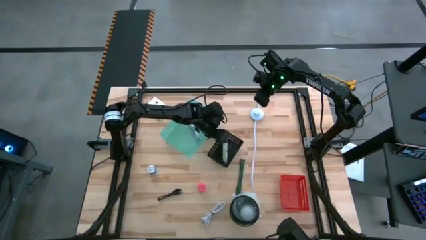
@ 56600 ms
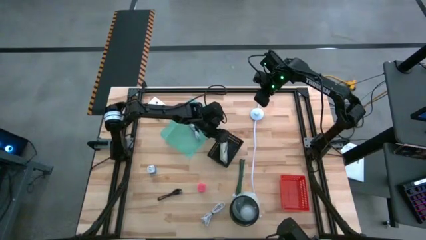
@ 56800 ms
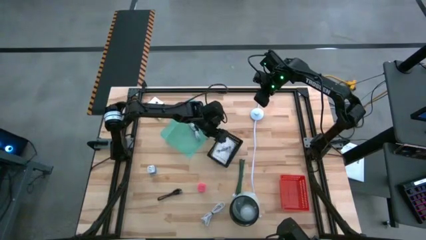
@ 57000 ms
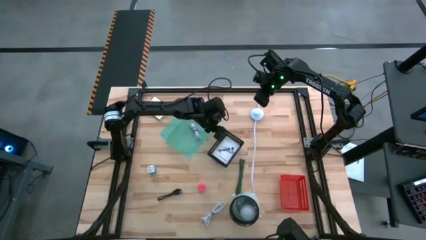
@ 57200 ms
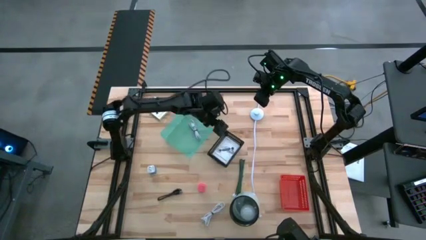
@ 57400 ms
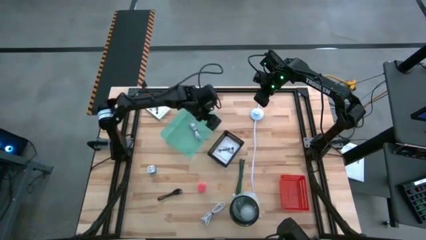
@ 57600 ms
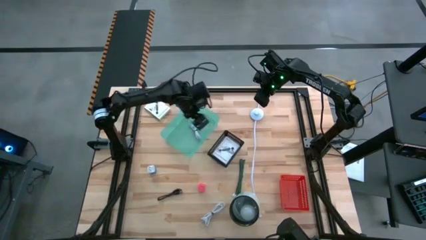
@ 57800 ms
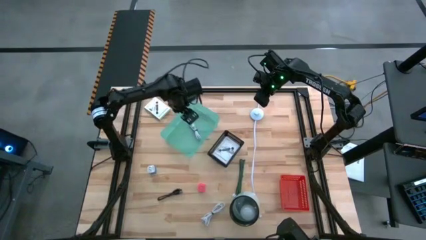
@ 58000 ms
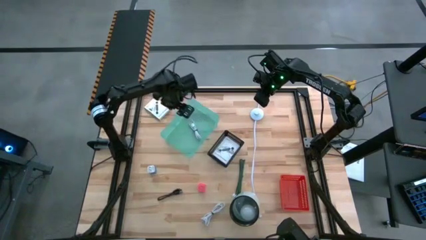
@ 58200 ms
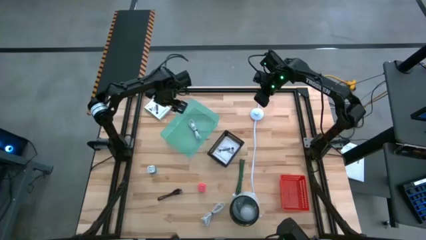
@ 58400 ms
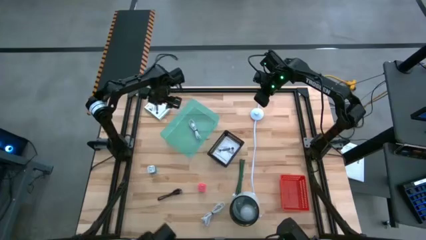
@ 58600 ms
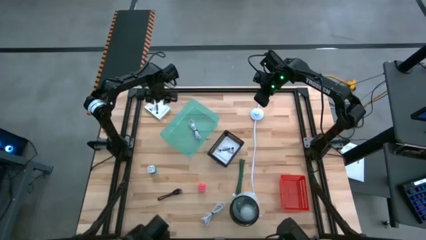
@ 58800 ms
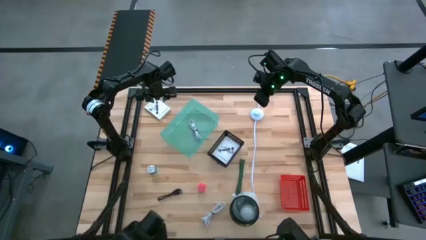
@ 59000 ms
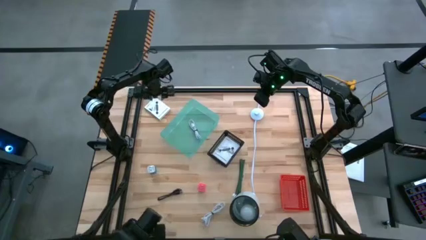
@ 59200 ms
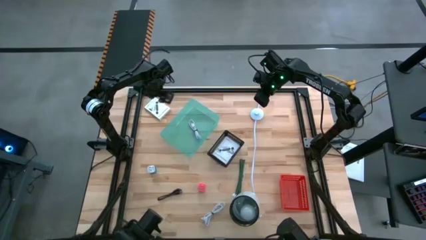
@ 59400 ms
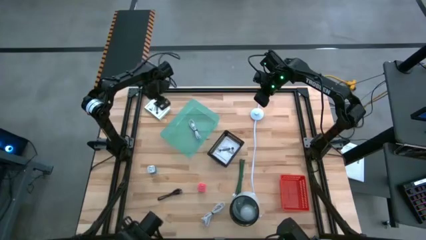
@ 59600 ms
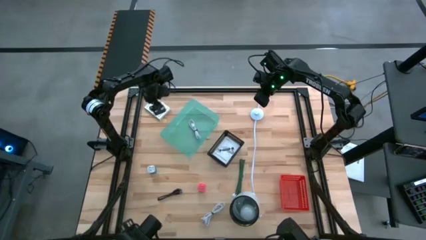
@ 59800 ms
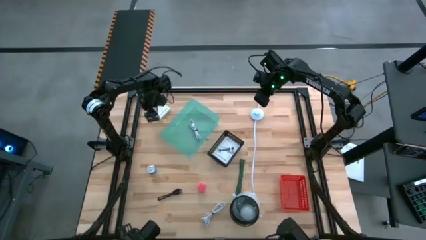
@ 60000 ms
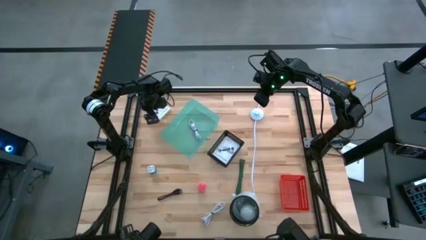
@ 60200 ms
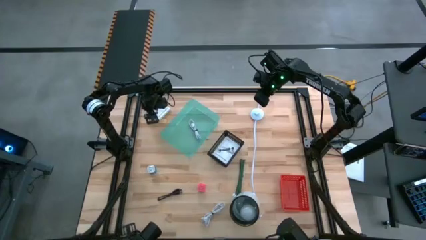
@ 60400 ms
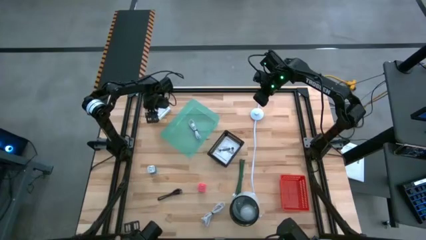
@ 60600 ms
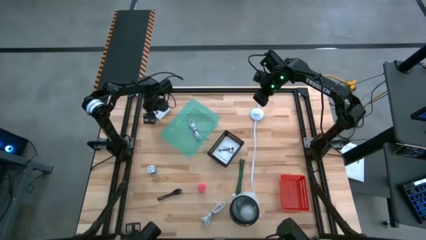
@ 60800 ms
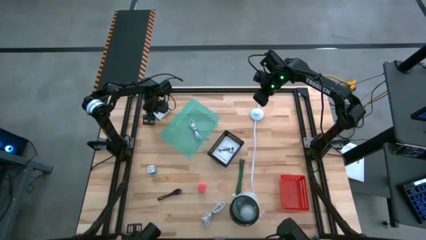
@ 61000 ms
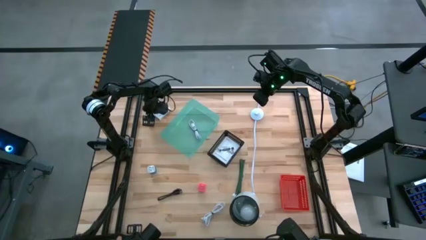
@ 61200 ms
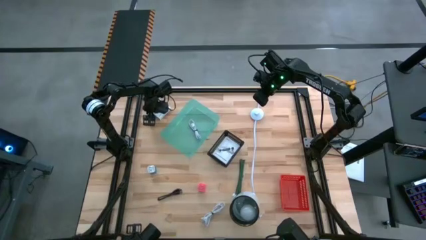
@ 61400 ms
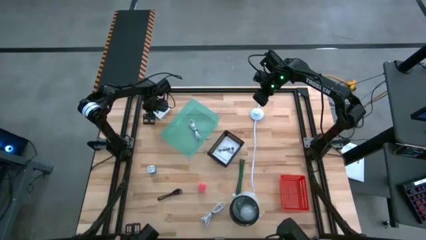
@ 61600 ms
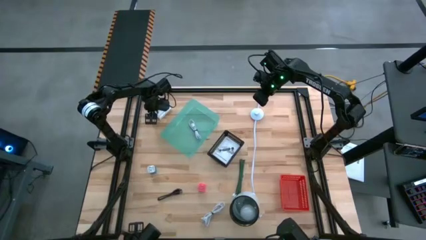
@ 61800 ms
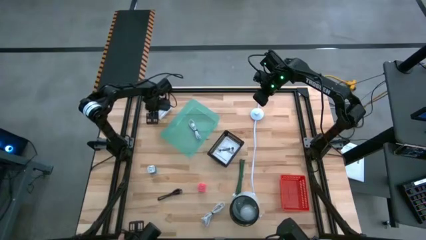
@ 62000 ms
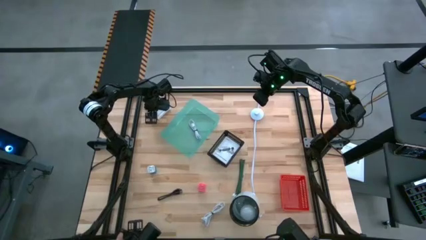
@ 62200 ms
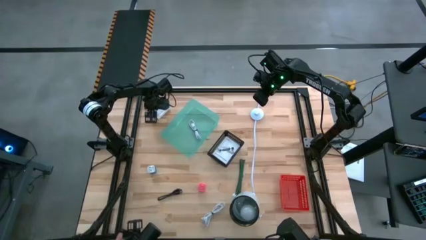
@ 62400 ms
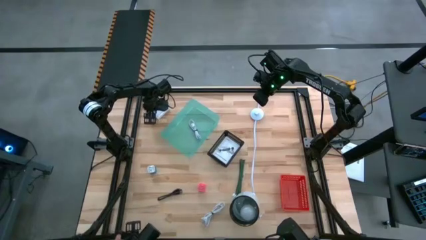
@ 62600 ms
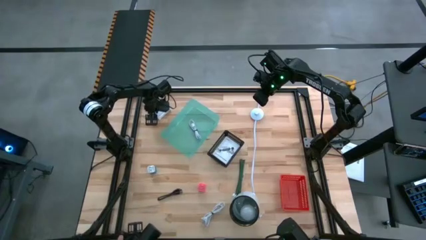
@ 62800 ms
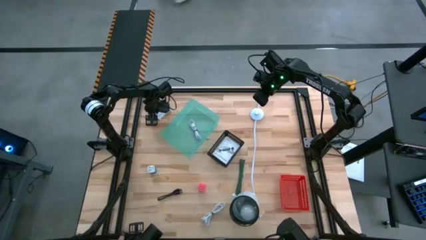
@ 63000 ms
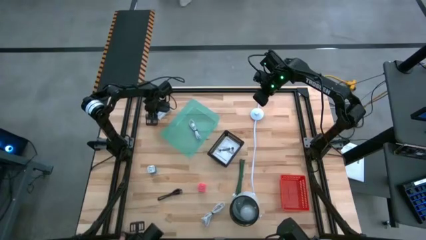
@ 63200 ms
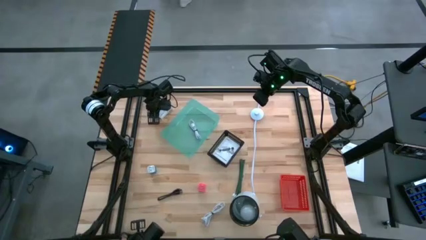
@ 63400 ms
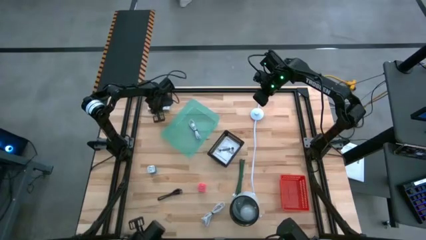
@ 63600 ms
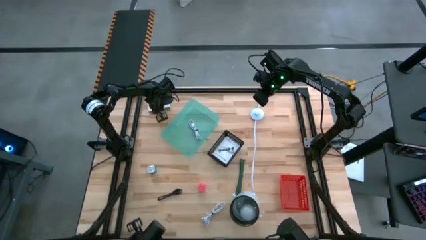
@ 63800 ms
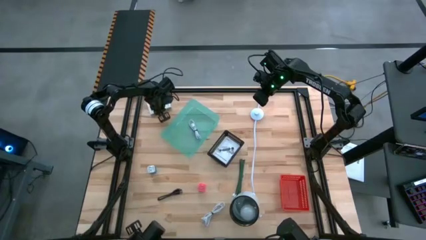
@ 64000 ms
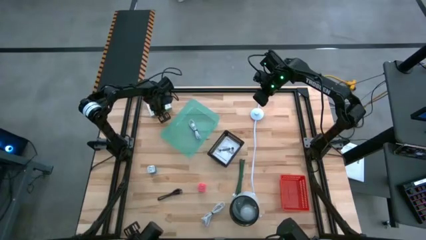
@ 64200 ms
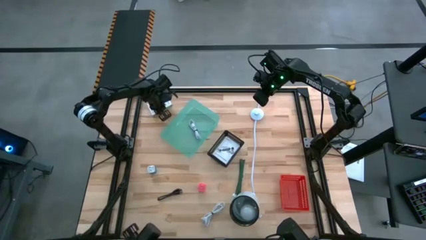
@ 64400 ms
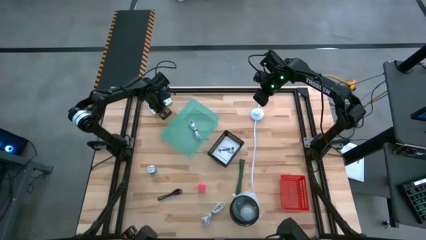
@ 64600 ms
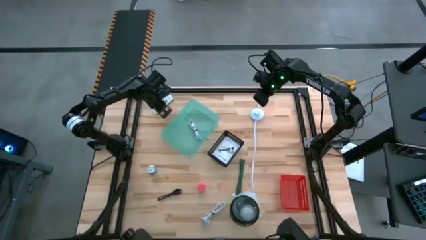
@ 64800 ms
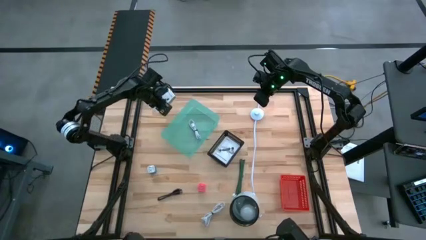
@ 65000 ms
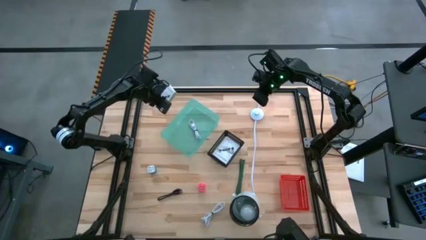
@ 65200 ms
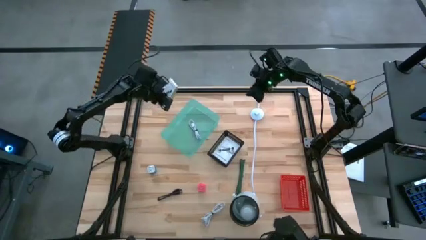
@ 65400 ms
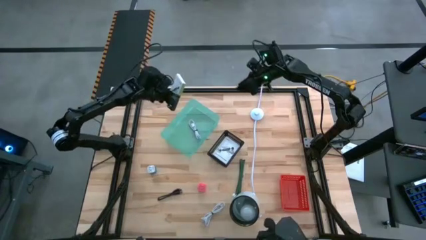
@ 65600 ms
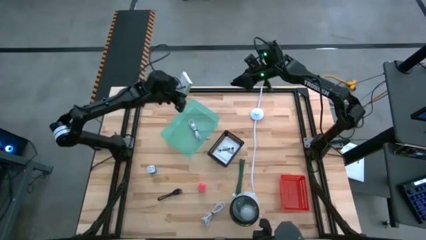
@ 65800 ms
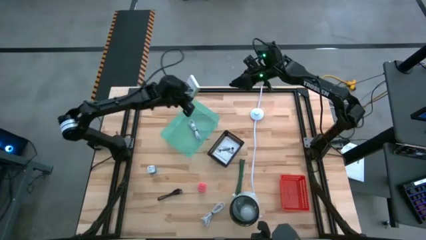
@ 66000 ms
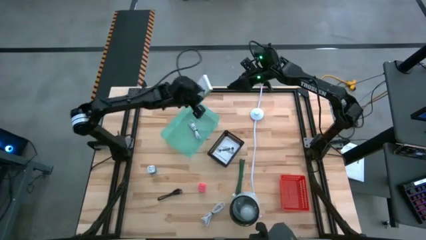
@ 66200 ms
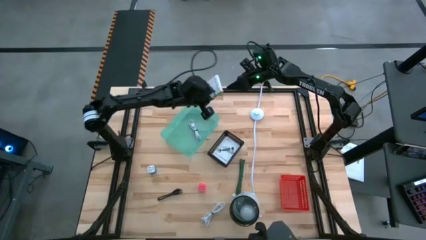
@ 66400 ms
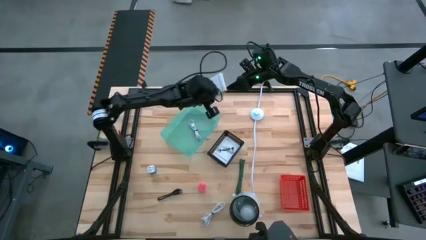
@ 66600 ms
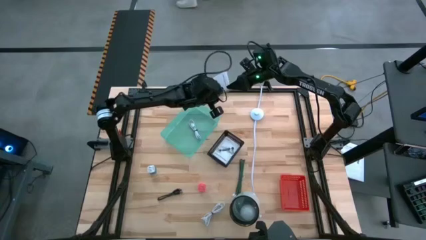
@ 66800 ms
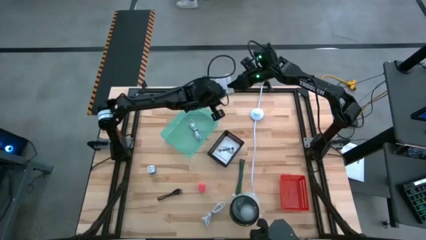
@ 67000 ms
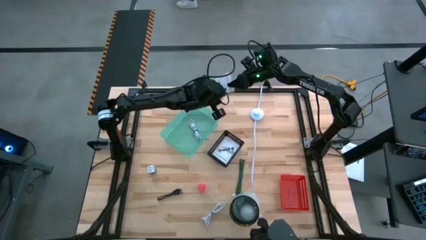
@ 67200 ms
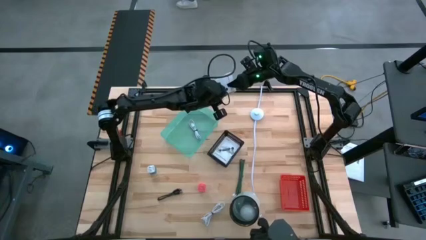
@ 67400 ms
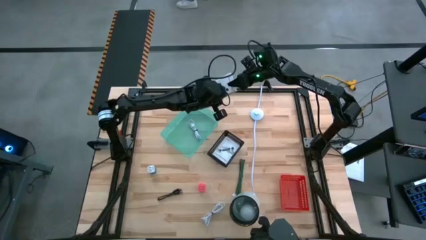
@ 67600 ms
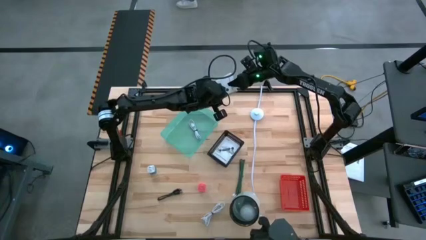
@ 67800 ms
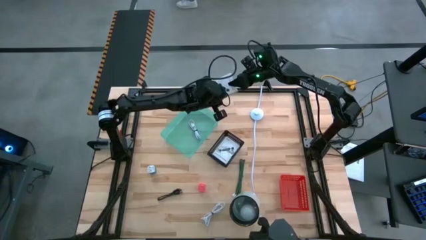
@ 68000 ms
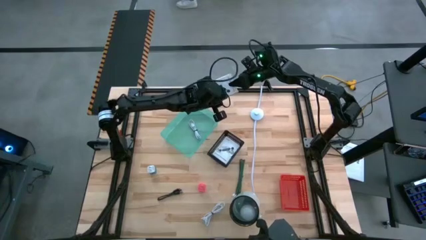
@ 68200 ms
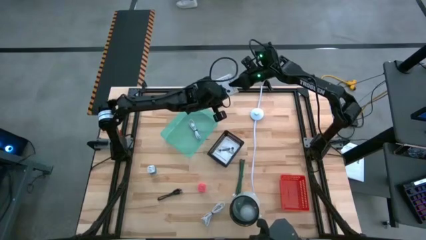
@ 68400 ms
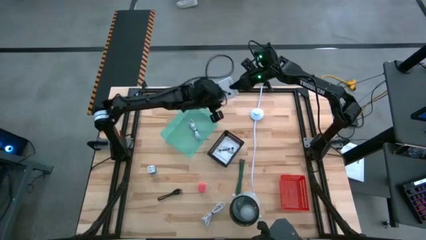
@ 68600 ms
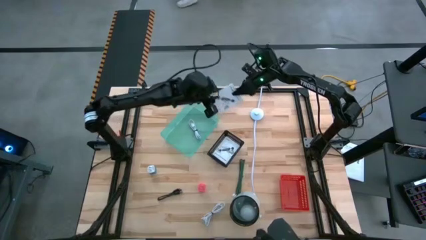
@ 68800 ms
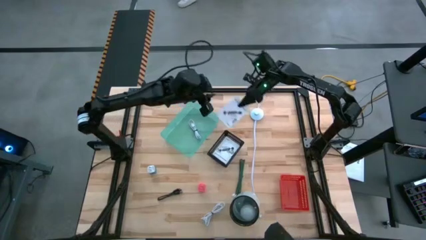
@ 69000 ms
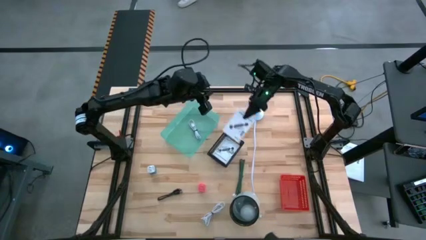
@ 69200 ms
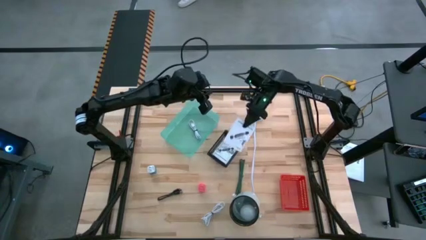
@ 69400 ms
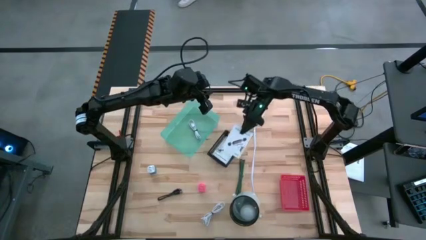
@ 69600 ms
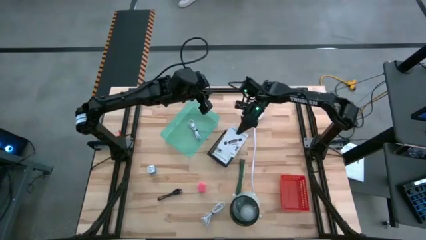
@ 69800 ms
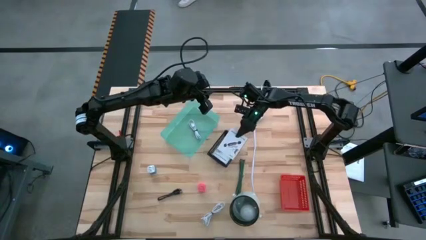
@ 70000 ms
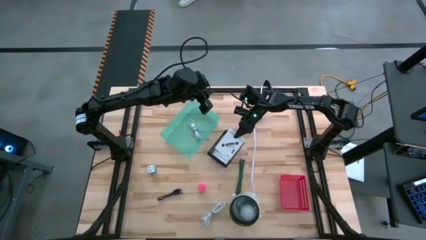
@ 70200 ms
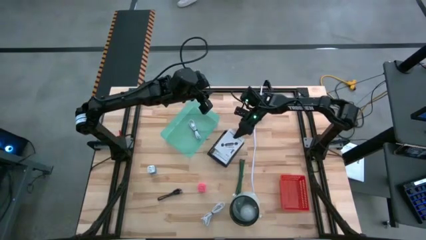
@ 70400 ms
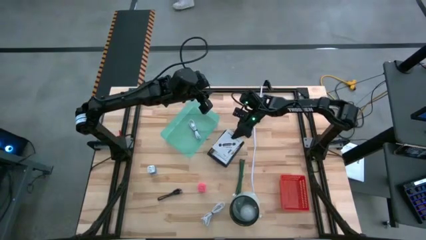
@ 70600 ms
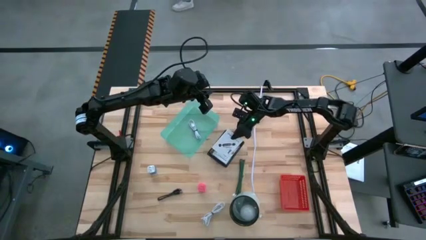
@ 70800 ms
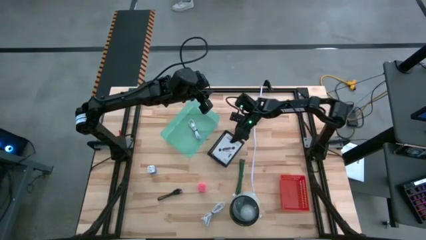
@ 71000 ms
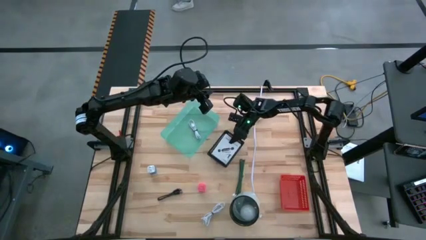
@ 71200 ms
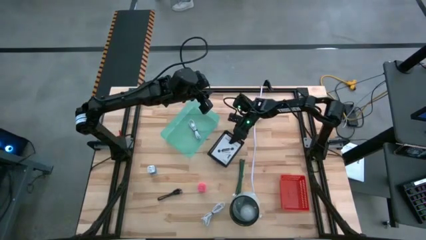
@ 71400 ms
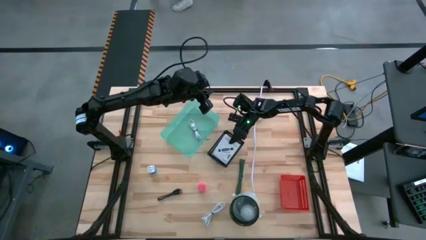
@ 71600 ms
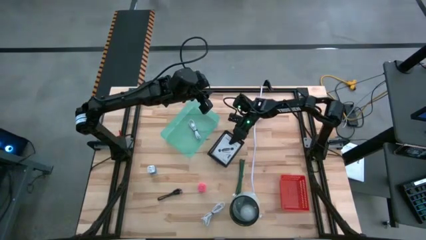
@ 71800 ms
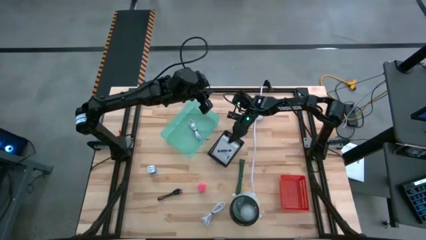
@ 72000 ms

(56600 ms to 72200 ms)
Task: Pick and place items into bin
Put the white box into the black bin

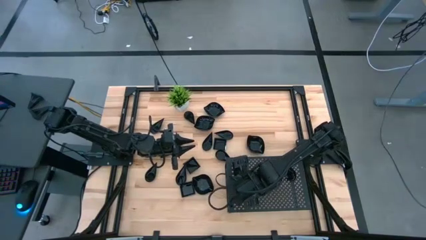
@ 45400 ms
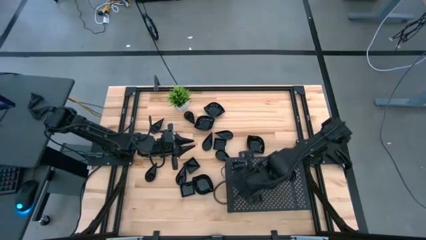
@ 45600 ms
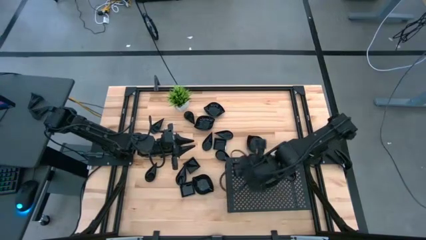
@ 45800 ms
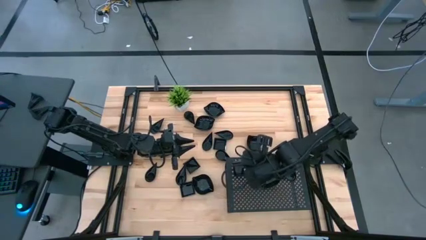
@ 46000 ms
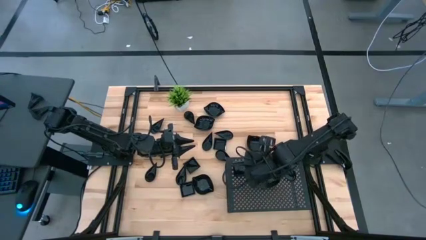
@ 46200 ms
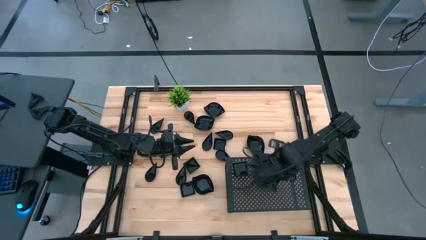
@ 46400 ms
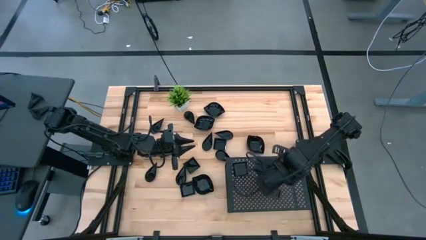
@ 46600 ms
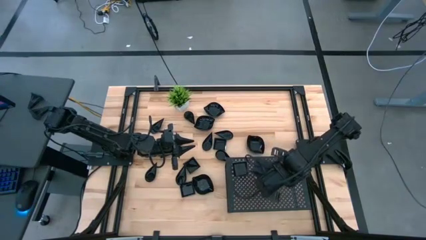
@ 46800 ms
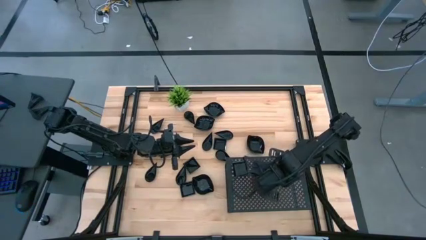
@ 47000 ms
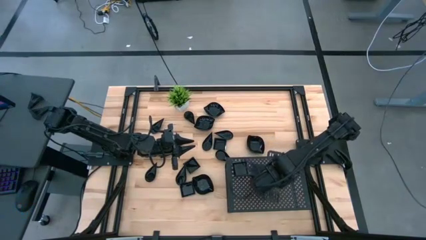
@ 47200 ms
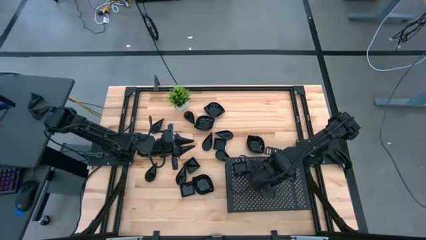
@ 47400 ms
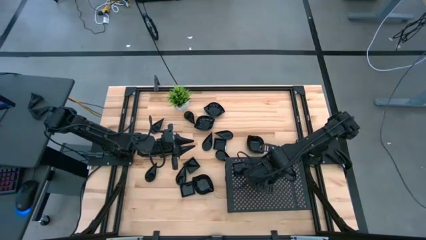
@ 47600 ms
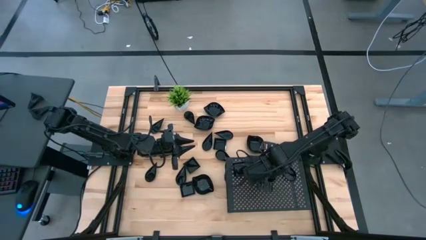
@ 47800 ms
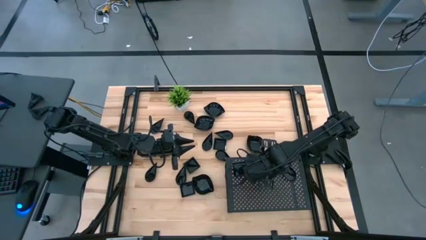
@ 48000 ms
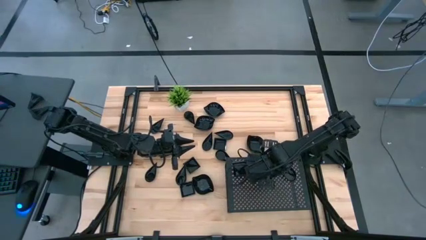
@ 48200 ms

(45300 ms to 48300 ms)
Task: Pick & Place Mini shaped plates
Adjust the stacked leaf shaped plates on the shelf
